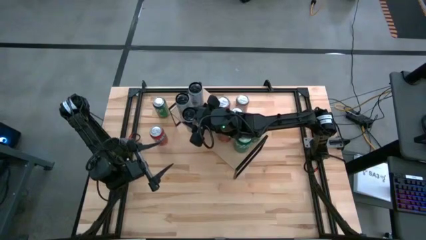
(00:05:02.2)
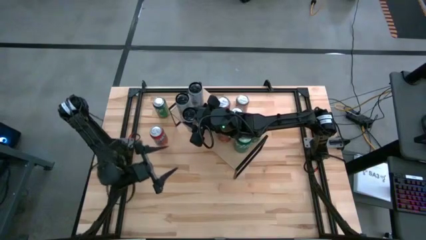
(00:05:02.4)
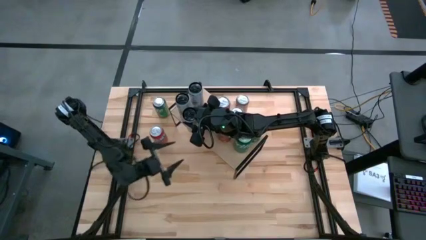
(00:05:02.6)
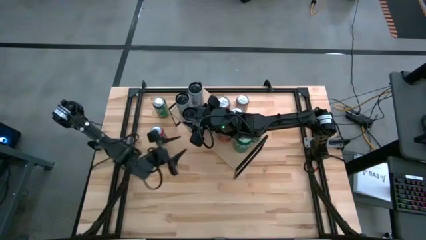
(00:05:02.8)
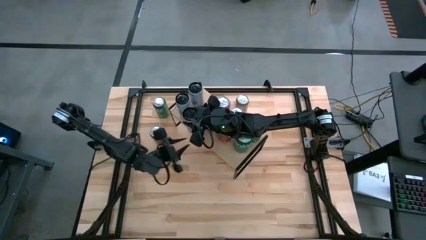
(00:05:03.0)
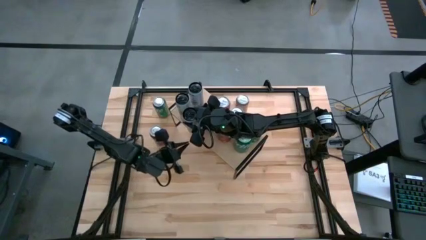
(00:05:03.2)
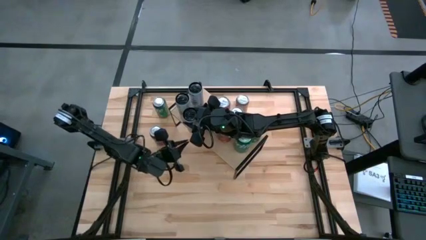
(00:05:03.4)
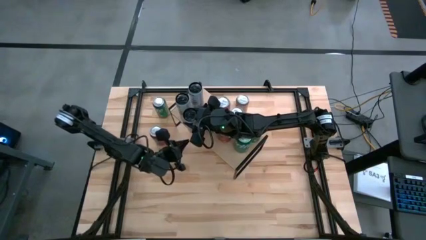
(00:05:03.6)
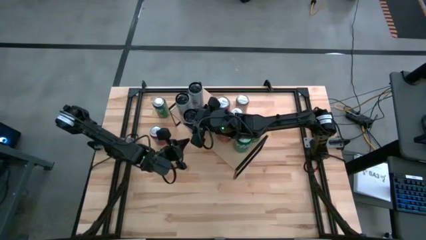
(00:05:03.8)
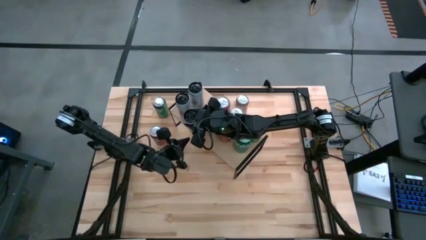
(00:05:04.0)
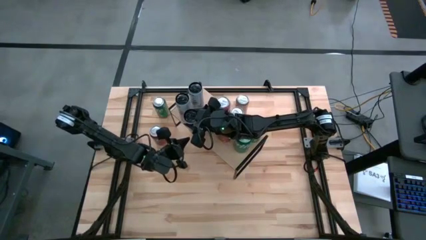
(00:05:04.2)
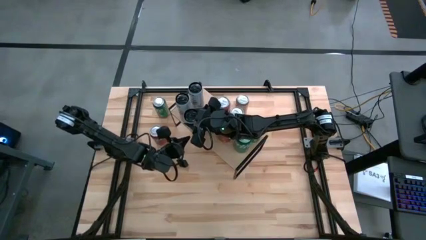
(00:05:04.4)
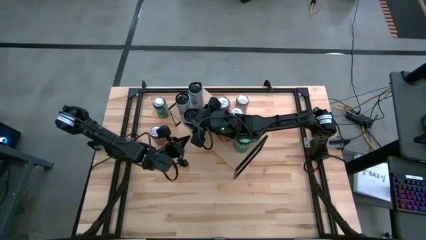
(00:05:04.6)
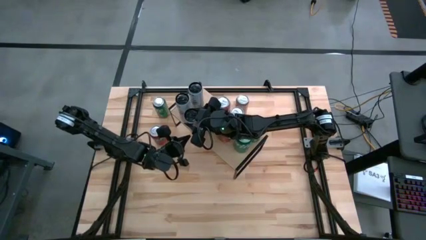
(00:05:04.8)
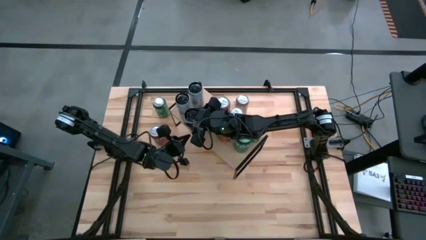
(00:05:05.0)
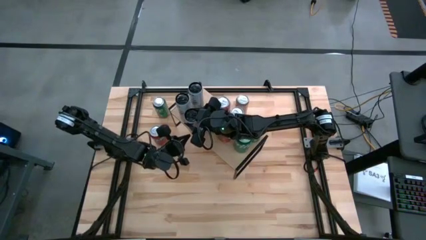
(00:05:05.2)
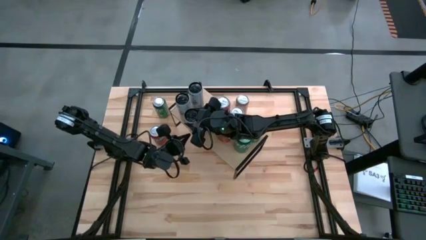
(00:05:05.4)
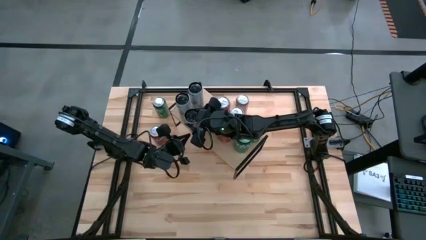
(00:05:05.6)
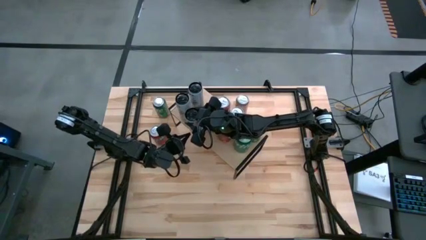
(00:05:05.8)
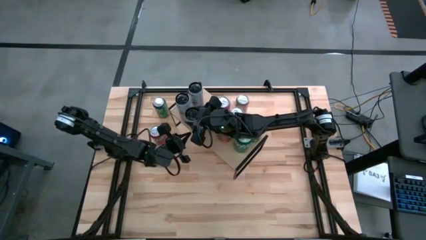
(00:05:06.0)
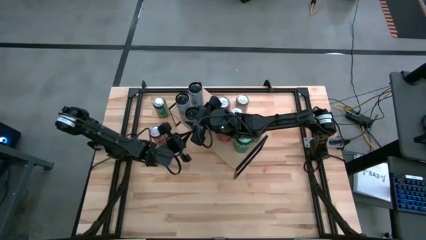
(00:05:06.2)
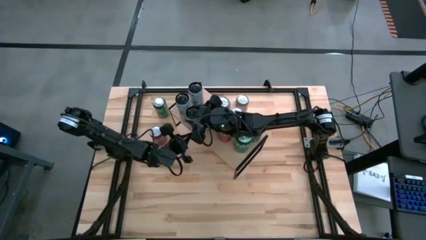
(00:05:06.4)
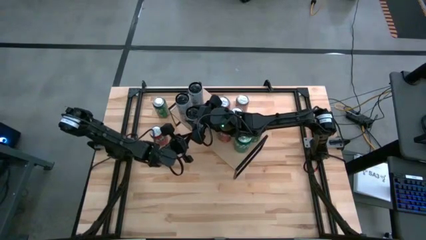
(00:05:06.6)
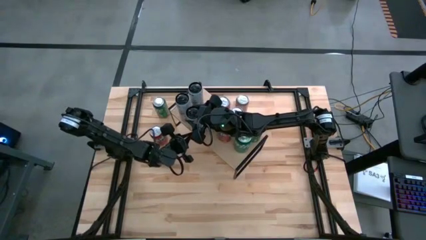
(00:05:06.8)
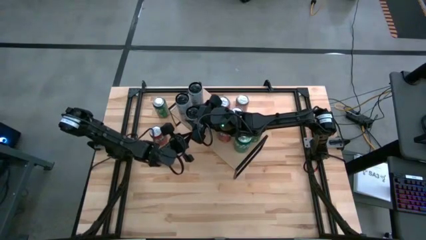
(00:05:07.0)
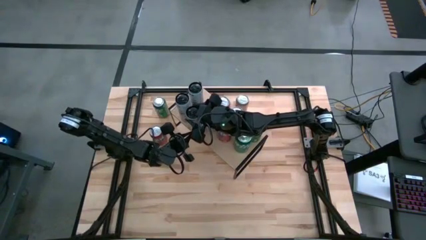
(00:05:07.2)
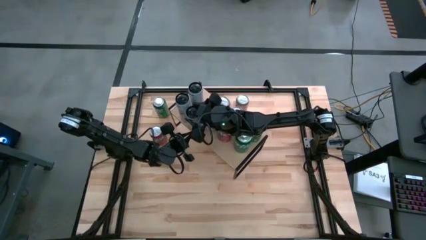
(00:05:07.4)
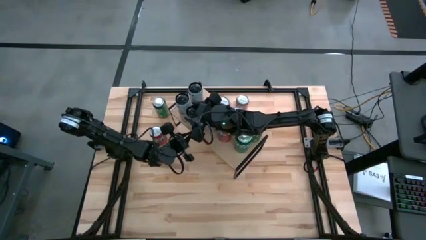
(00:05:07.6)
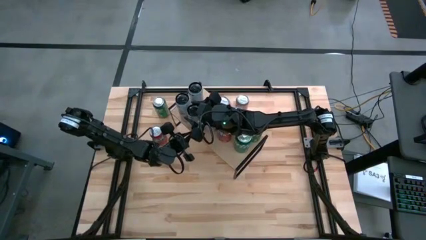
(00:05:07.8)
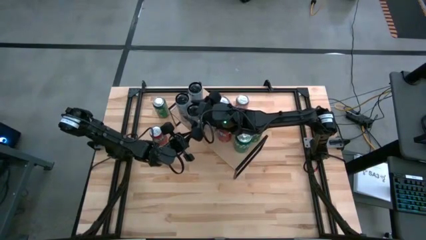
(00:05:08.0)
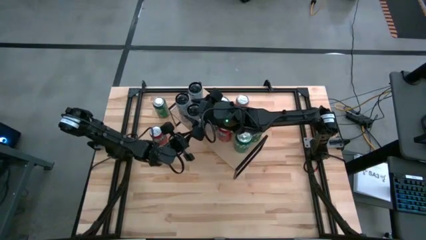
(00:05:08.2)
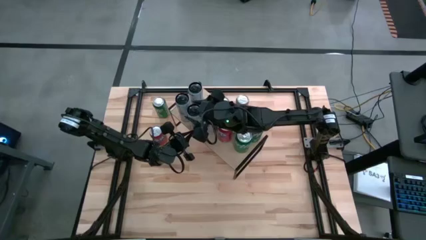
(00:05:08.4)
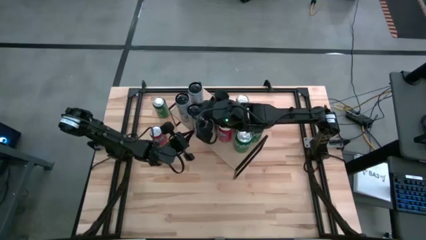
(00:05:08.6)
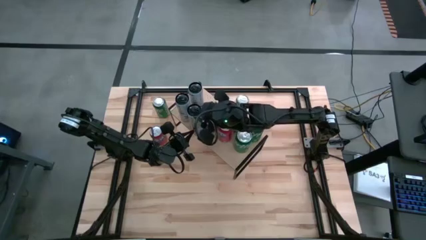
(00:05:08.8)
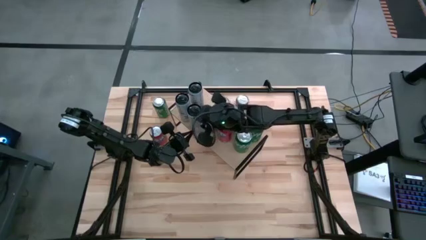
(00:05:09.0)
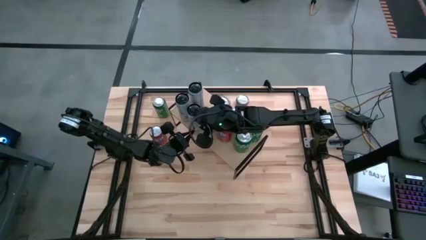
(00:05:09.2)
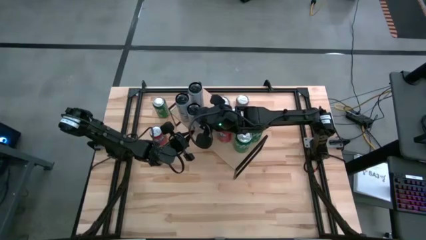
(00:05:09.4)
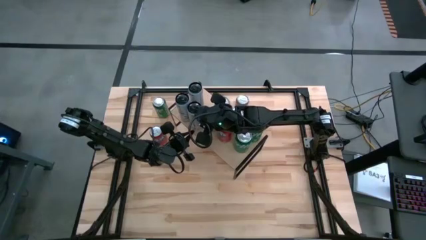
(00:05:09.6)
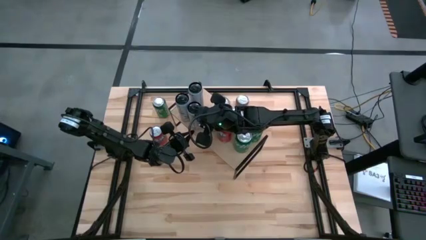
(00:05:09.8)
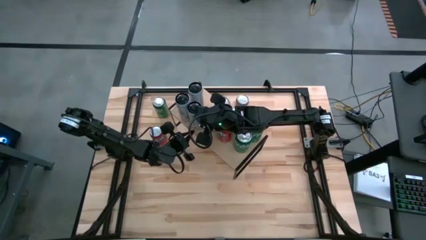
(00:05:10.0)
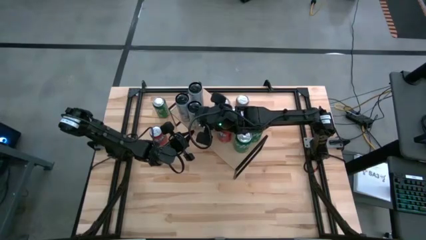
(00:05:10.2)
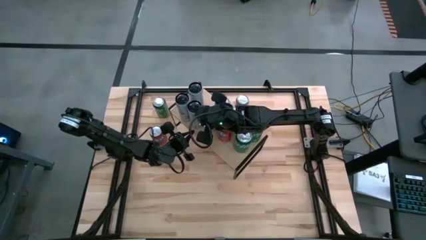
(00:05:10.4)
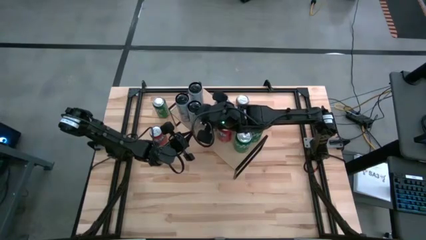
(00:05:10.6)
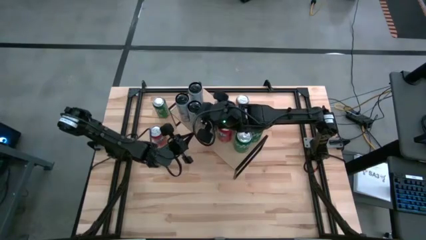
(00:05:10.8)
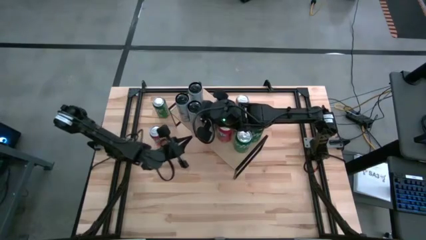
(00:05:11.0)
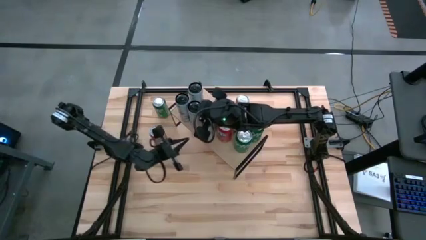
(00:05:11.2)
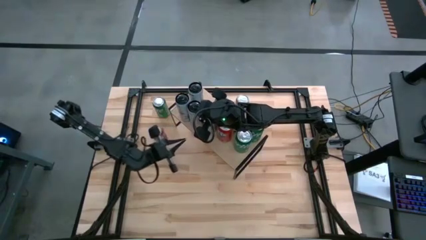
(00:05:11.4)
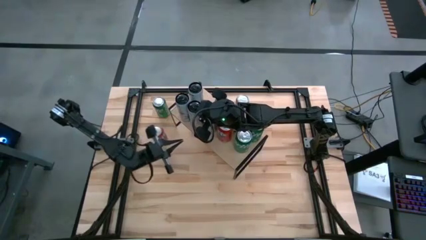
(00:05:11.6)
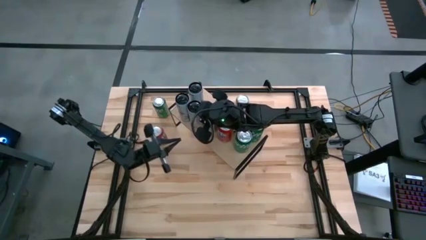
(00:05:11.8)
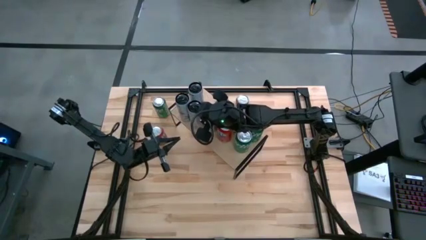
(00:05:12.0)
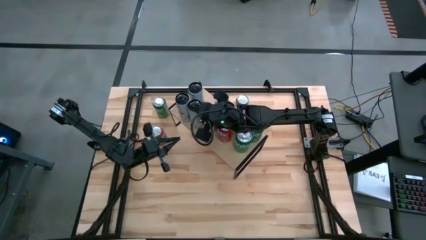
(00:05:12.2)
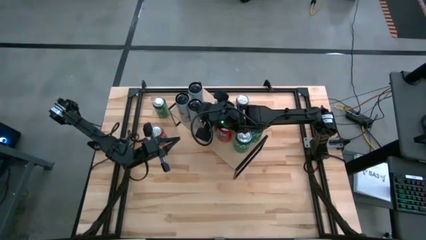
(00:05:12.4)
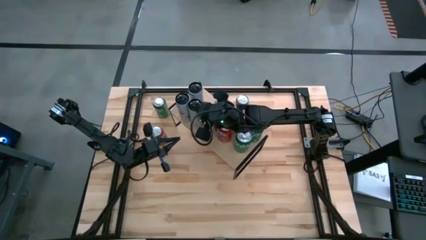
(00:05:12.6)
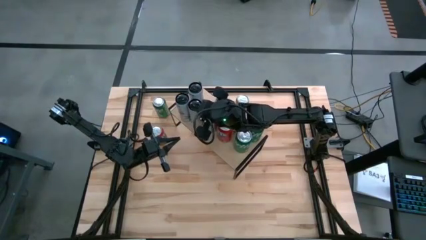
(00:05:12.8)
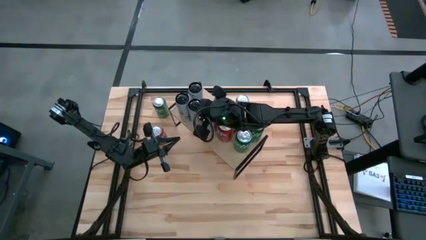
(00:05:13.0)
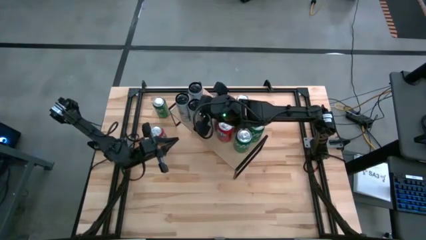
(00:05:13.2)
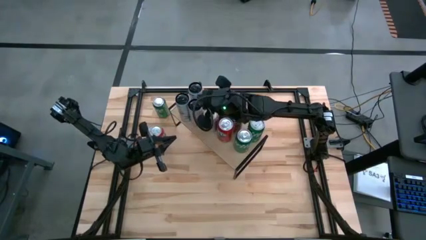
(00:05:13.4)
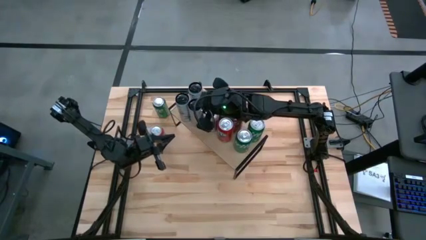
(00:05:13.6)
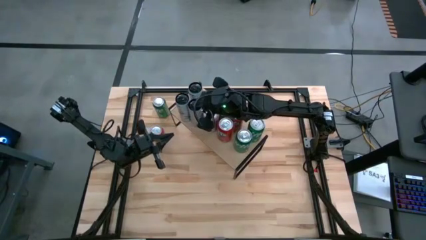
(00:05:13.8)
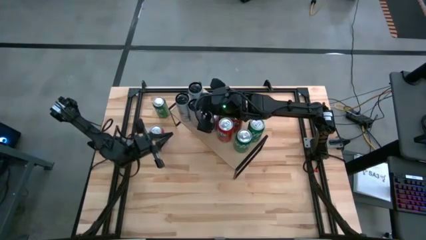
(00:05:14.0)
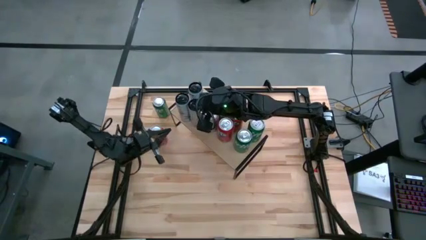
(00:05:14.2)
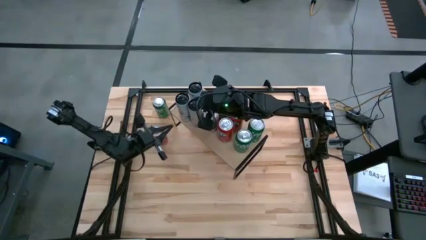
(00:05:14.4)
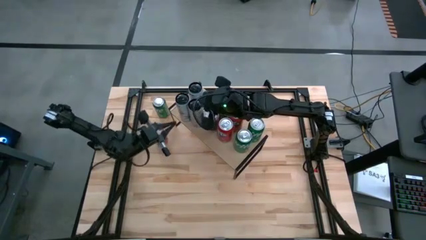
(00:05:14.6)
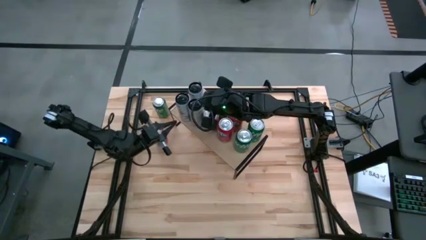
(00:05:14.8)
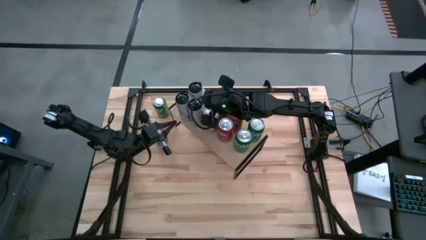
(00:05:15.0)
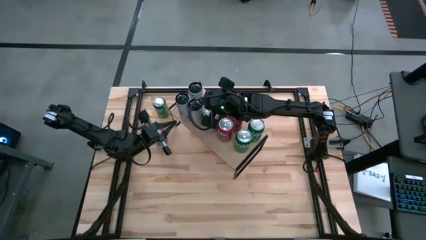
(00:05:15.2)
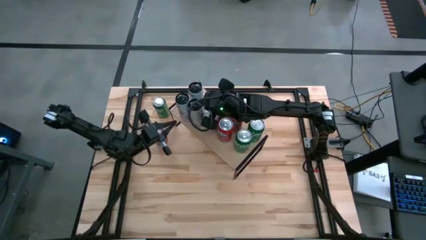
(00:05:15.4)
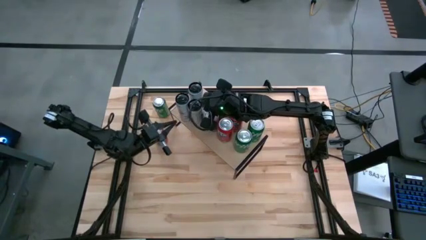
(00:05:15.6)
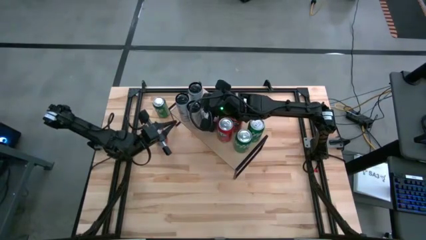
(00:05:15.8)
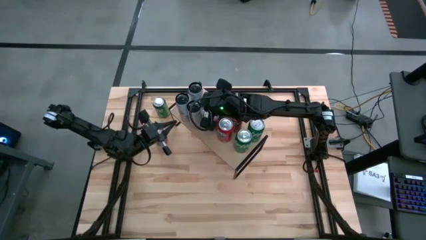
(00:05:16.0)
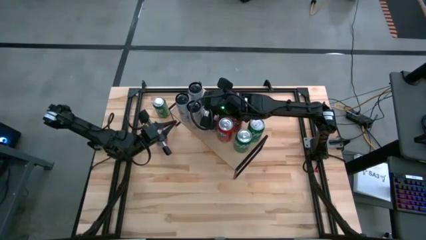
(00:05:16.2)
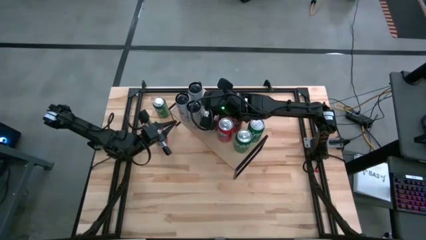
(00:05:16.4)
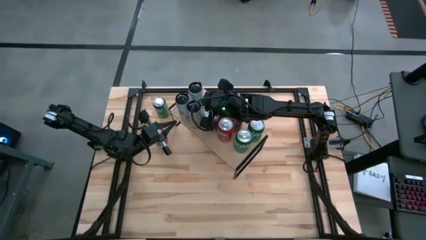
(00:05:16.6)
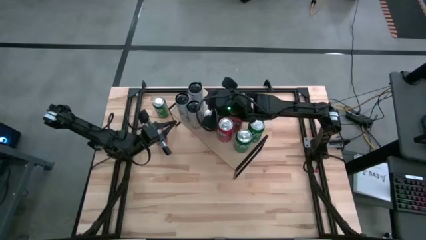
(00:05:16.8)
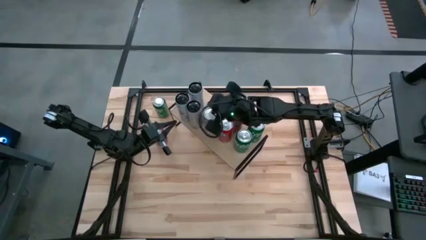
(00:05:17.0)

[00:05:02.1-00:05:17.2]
Task: Place canned beverage on shelf
Put the yellow soda can on the shelf aligned with the blue soda can

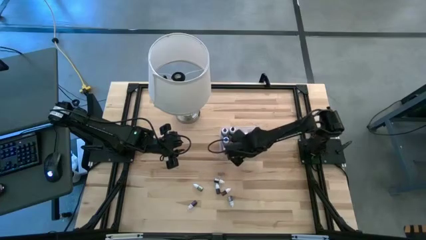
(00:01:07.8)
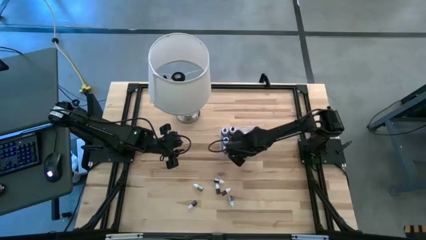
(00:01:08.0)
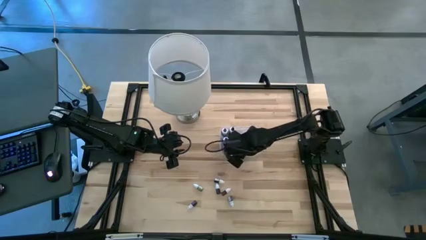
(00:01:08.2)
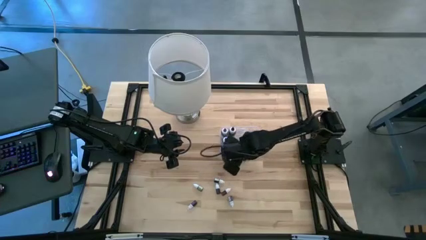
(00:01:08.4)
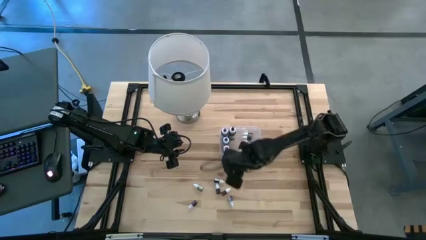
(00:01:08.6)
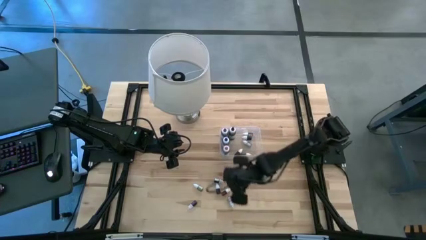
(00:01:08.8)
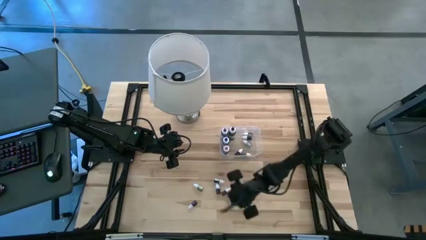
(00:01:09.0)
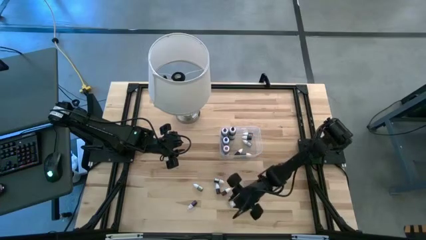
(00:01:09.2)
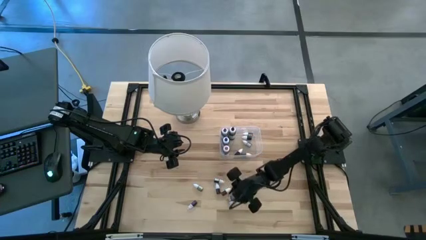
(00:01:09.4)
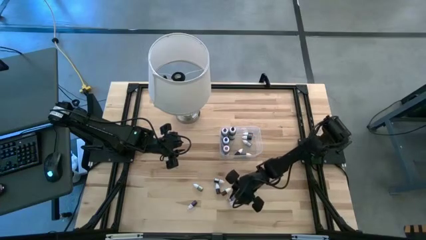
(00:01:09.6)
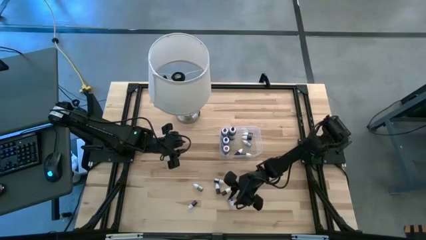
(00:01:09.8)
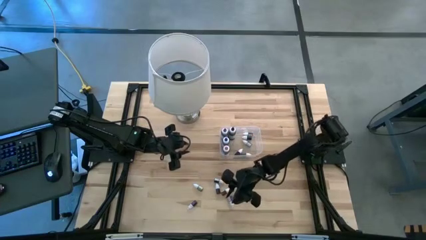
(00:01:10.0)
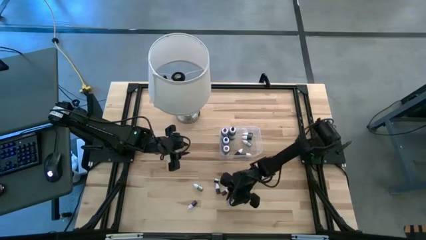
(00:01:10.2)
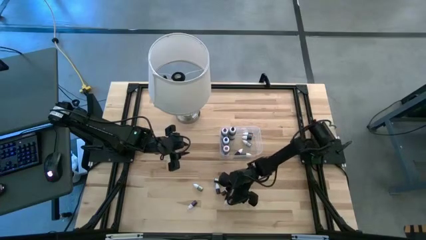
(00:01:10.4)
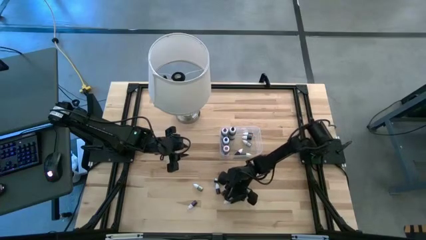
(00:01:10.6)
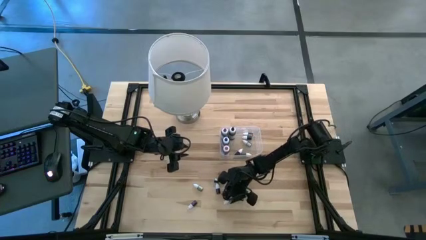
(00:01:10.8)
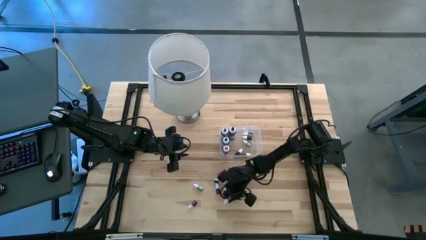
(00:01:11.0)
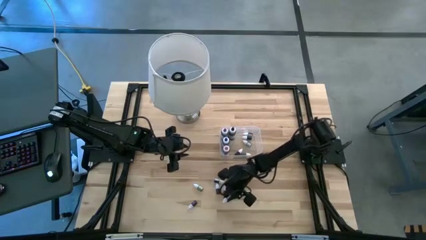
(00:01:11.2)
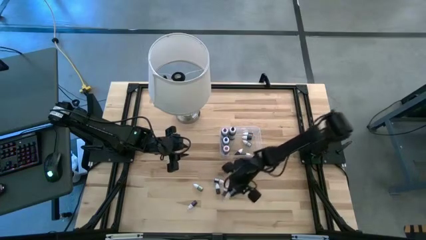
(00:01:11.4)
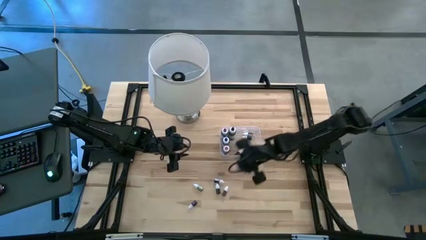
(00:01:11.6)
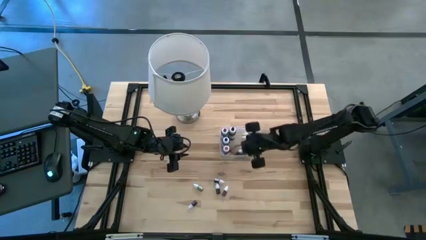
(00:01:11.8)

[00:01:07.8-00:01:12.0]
Task: Pick & Place food coloring
Put the right small purple food coloring bottle into the transparent bin
